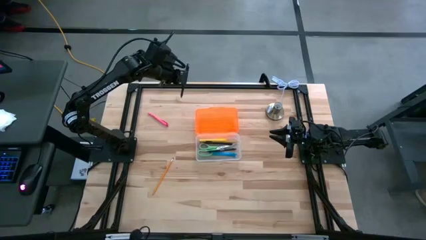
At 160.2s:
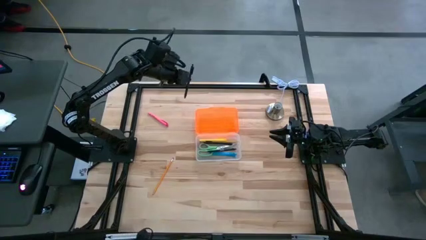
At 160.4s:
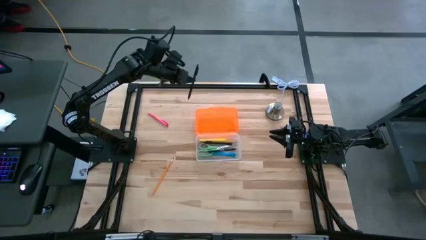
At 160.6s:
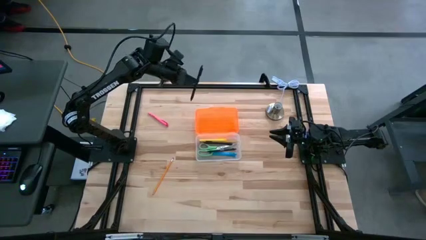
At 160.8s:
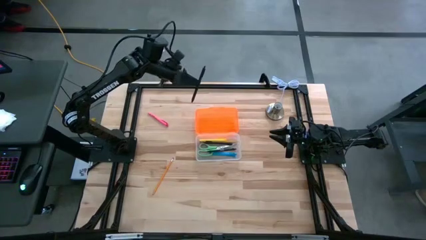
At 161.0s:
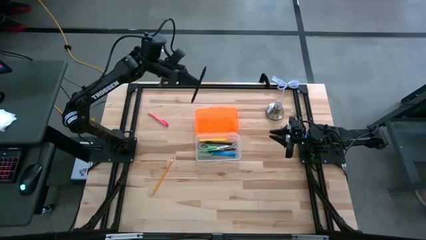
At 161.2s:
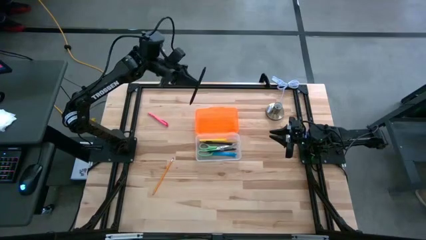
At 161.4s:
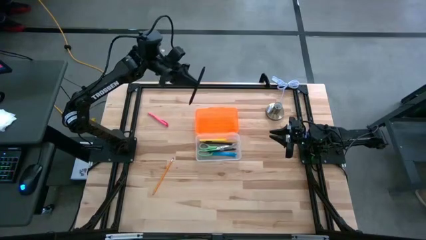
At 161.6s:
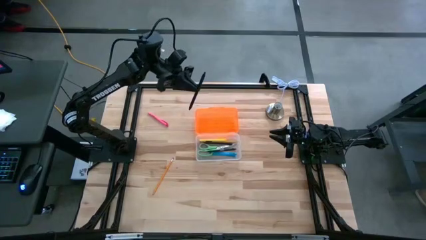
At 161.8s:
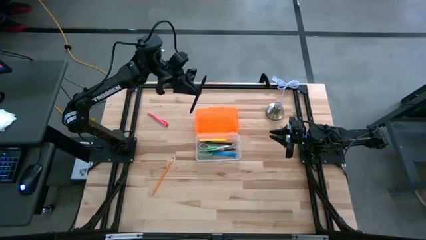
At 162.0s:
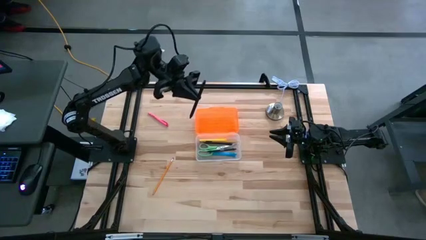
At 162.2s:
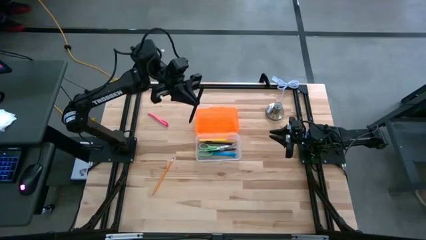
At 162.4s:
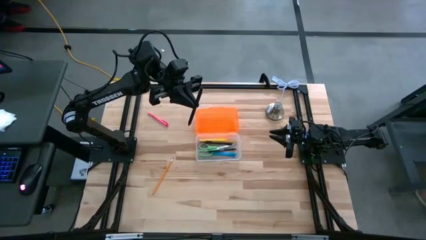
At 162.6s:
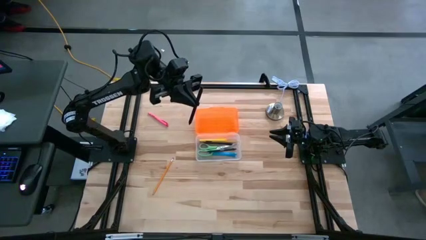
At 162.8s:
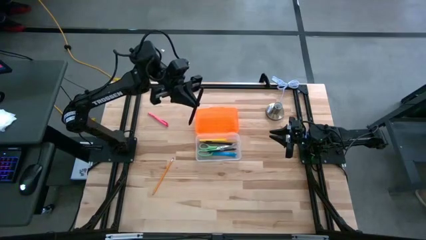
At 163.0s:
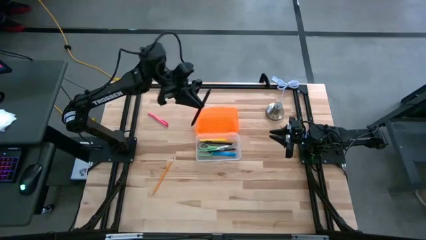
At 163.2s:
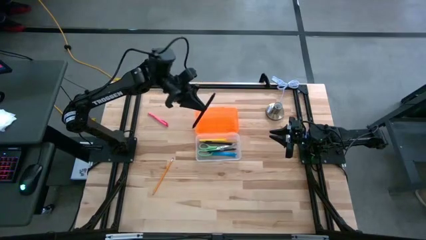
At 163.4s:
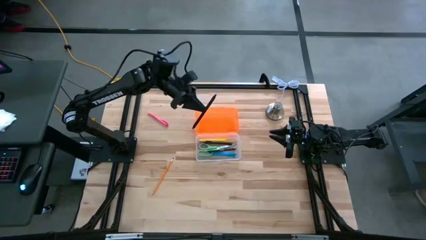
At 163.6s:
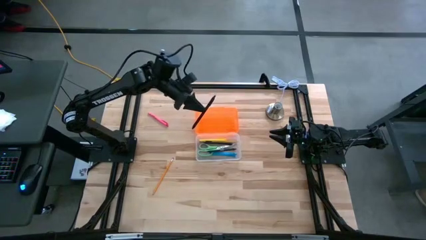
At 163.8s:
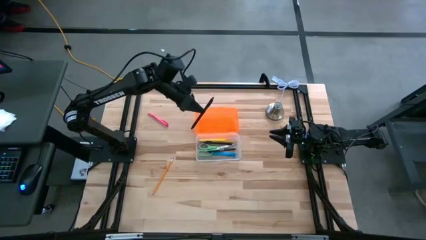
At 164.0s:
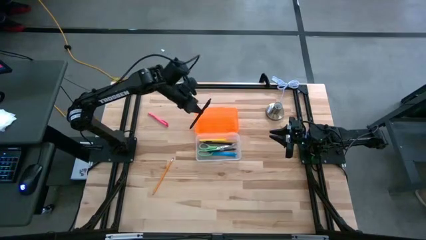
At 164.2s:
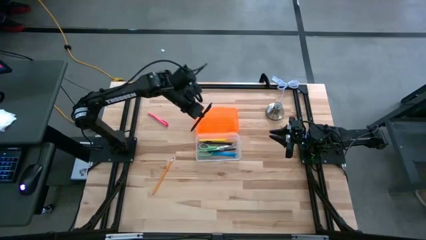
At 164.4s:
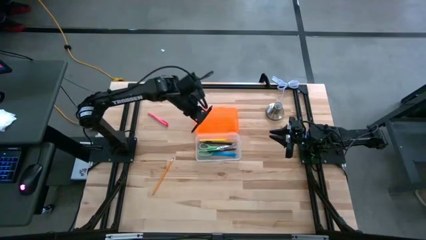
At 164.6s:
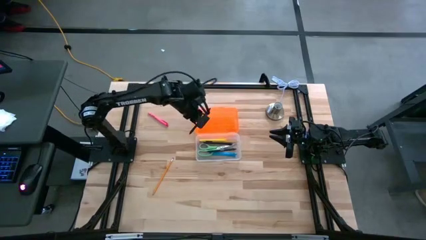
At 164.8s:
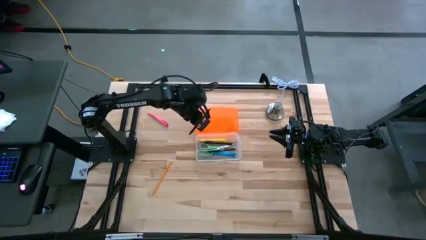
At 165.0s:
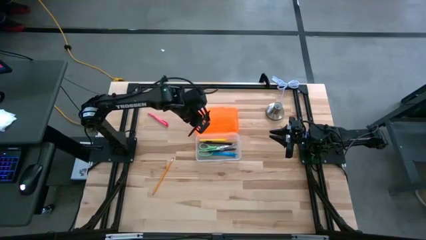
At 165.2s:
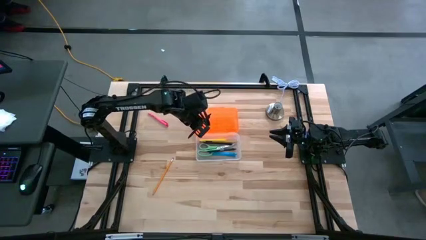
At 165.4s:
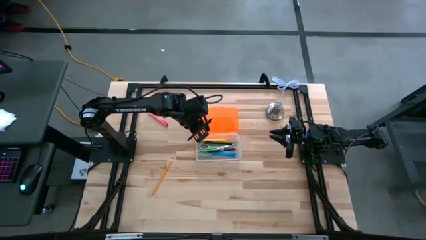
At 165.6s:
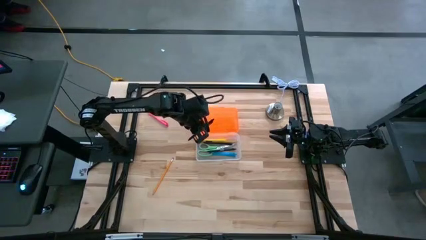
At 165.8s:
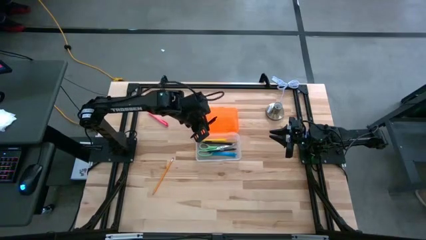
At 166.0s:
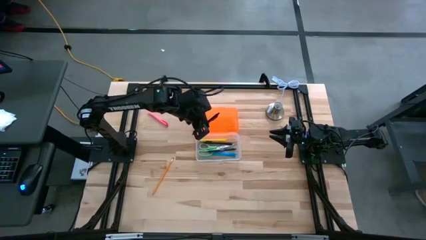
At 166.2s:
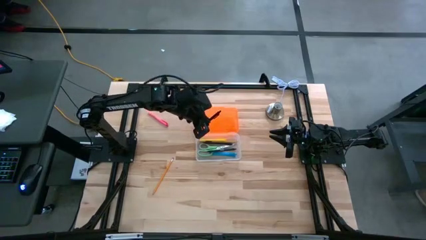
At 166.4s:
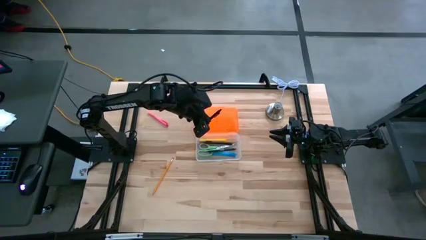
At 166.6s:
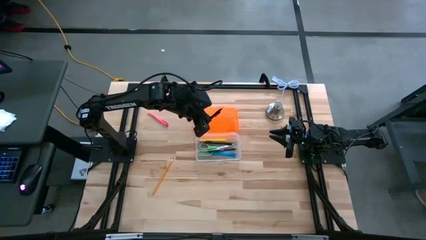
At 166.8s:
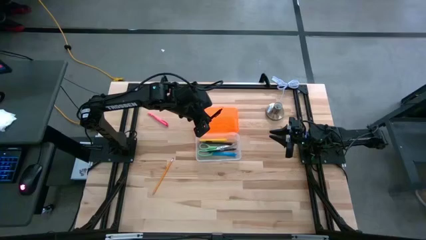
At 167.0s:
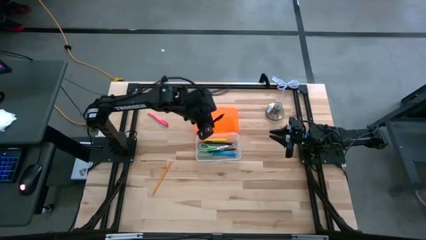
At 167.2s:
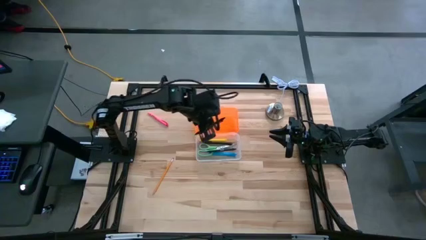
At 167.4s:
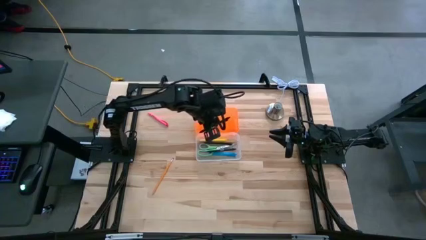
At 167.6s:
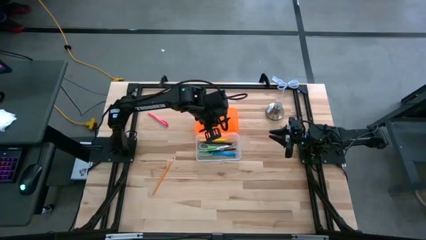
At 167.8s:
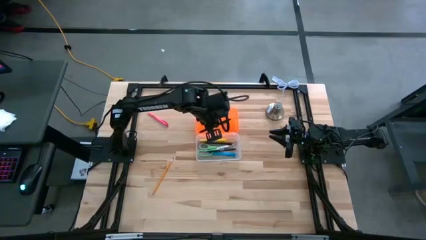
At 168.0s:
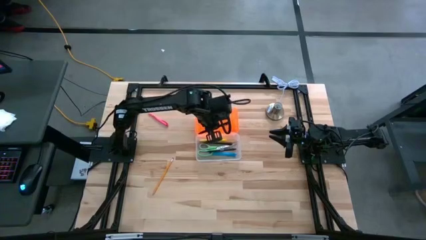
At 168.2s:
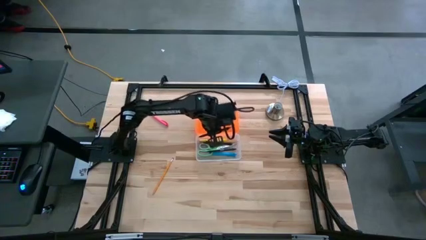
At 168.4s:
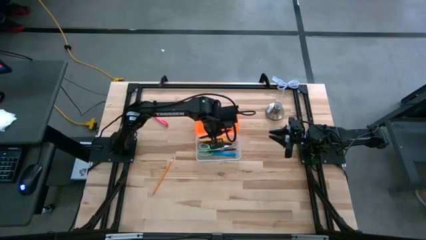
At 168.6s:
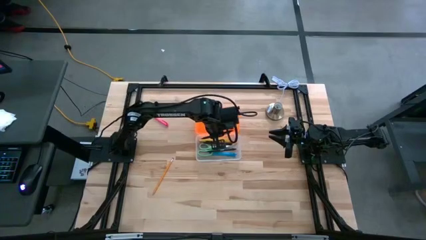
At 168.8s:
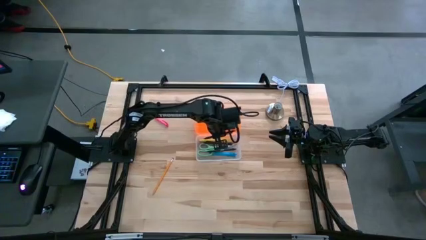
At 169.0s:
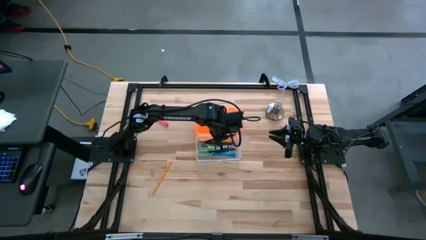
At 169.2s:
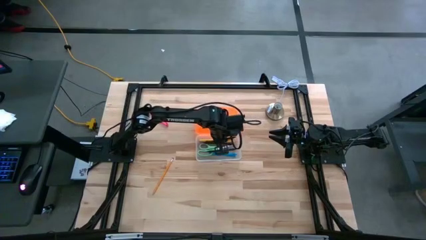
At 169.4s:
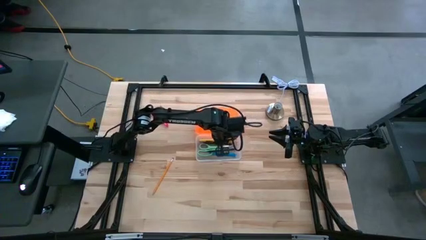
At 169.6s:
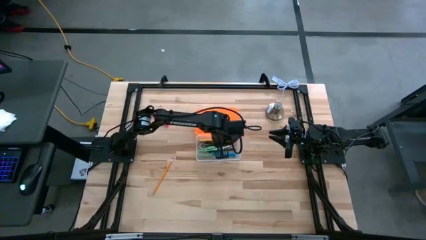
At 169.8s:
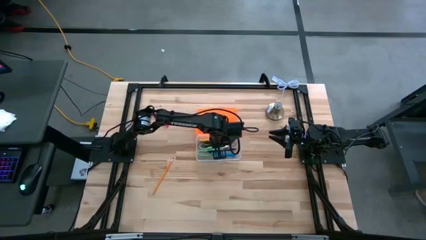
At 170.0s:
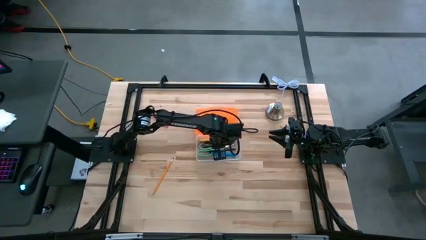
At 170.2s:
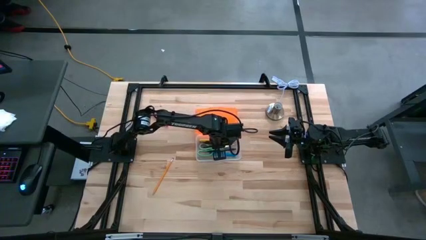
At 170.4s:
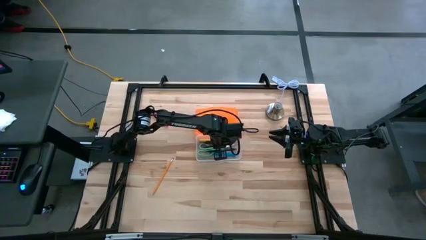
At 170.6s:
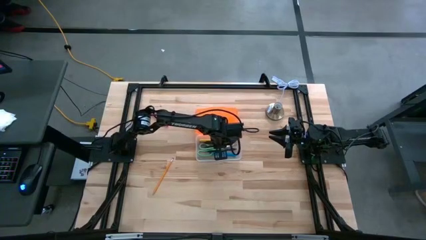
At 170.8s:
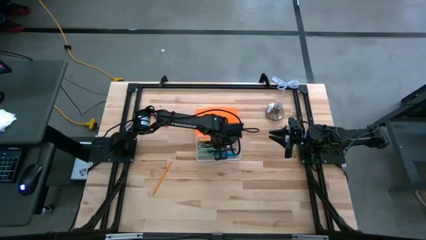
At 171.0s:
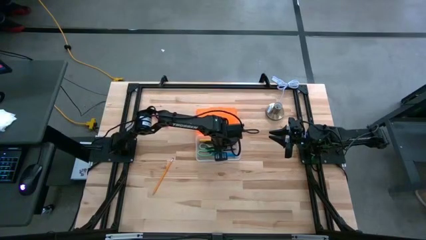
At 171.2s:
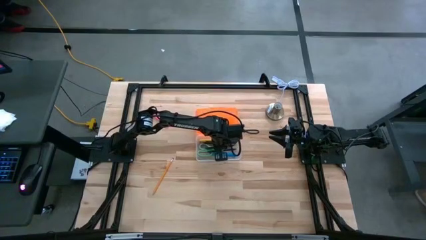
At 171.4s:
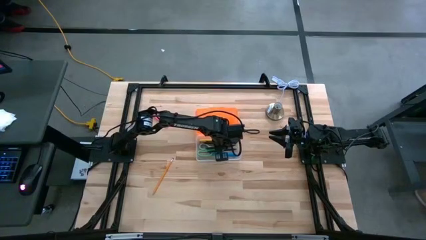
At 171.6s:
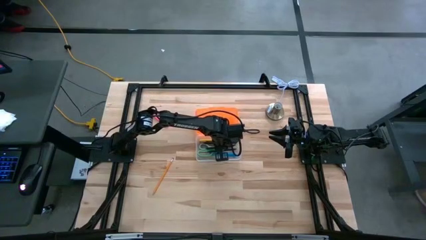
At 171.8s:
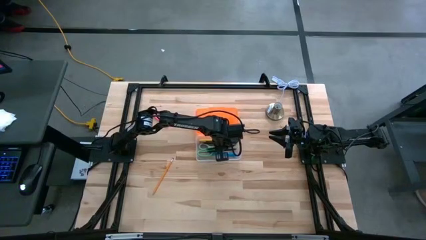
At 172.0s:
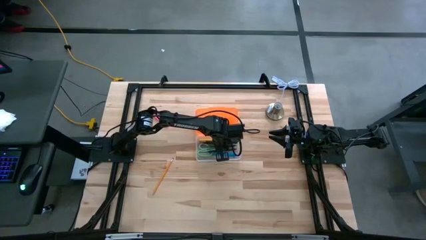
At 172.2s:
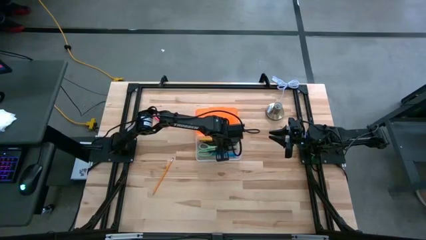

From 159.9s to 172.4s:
Task: Pick & place school supplies into a supply box
Put the black pen into the orange supply box
